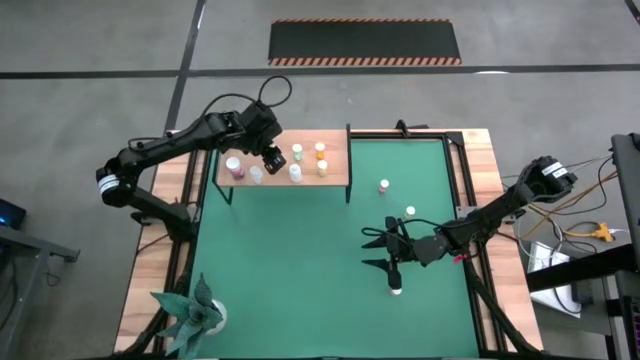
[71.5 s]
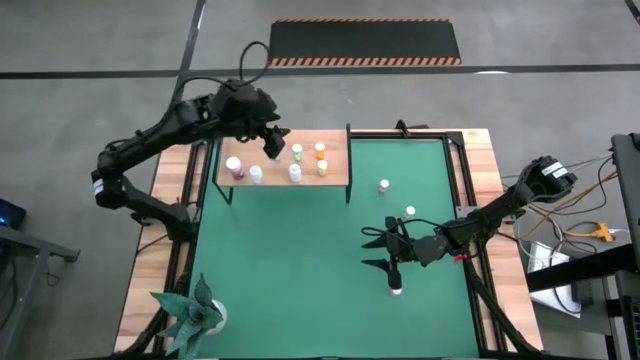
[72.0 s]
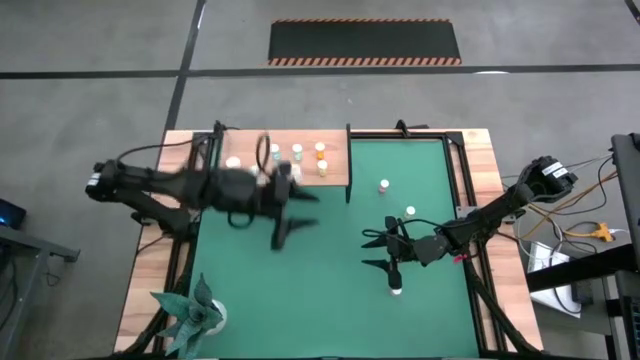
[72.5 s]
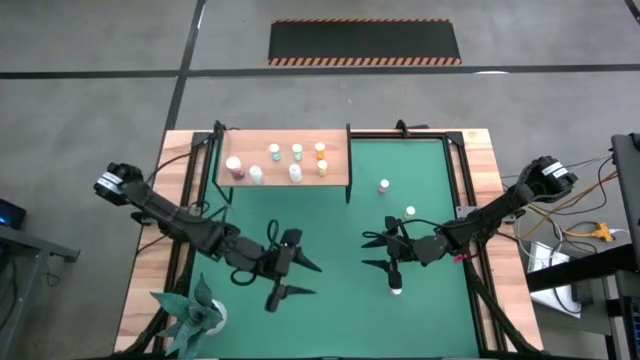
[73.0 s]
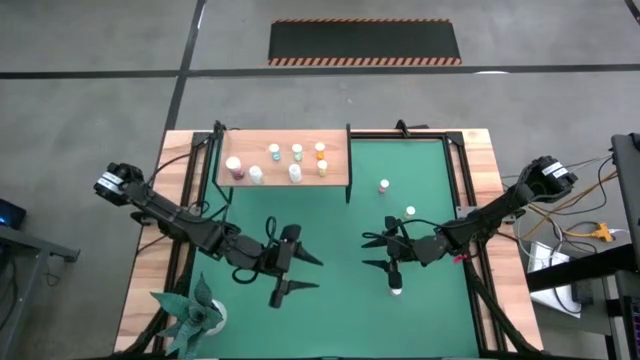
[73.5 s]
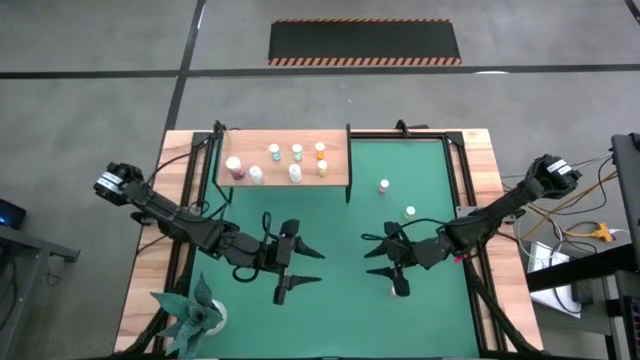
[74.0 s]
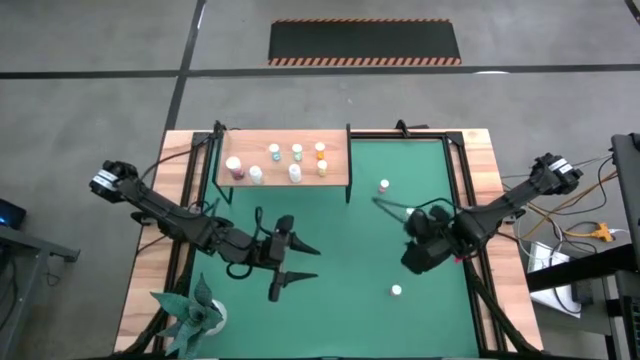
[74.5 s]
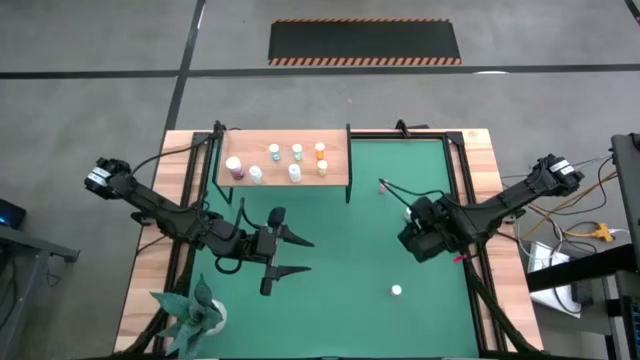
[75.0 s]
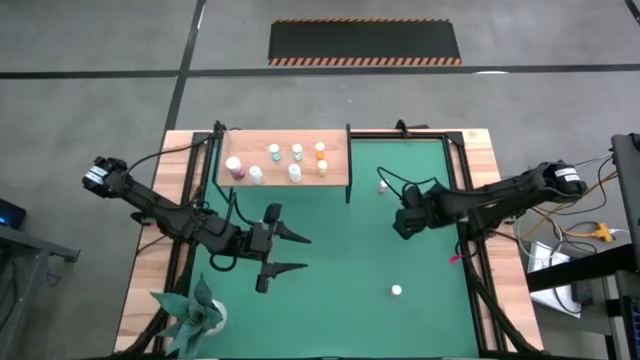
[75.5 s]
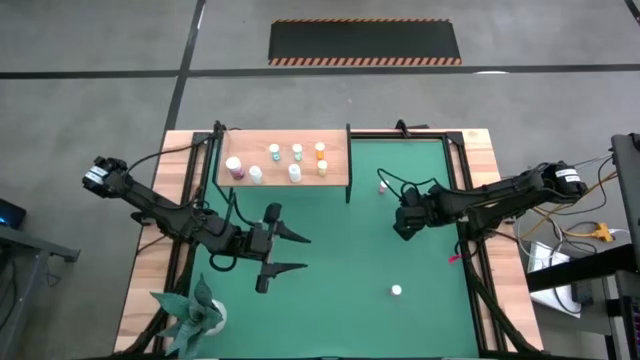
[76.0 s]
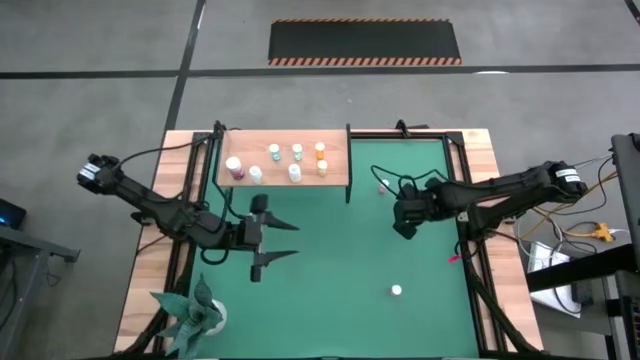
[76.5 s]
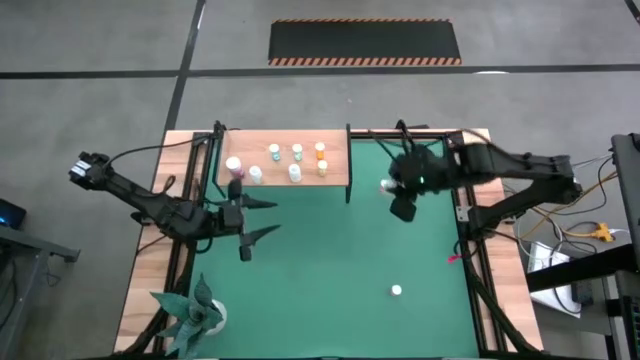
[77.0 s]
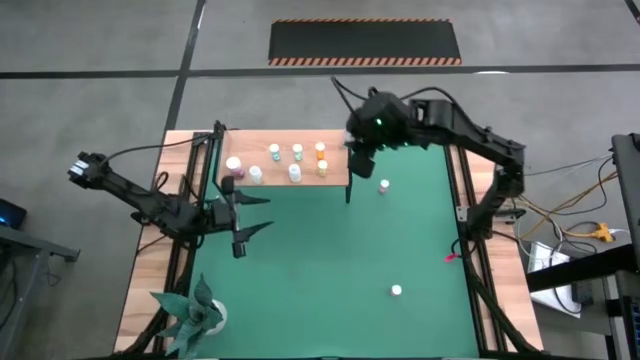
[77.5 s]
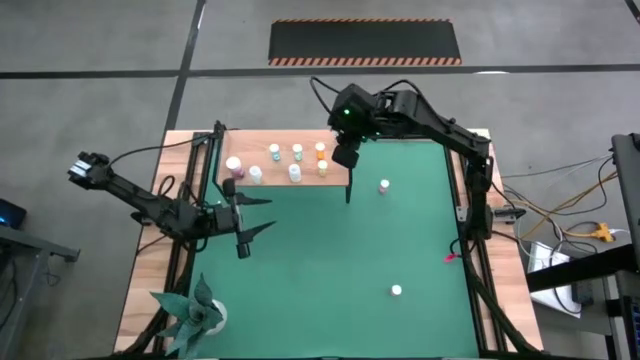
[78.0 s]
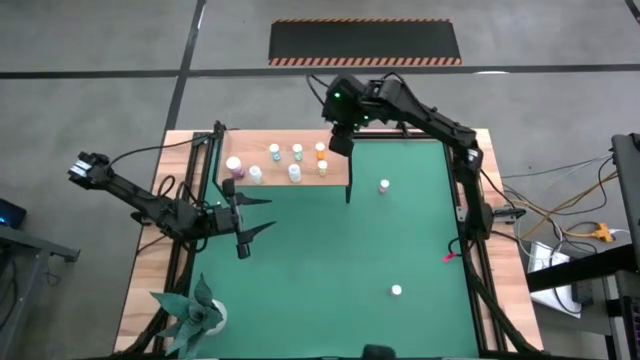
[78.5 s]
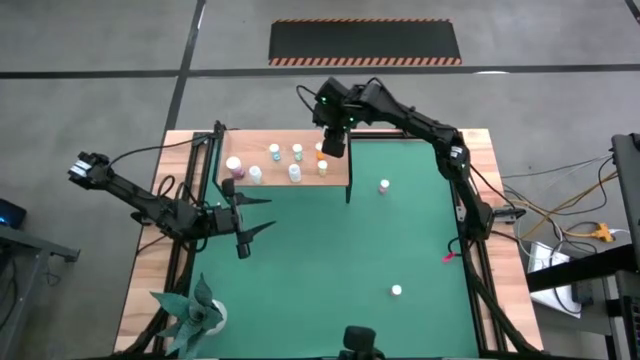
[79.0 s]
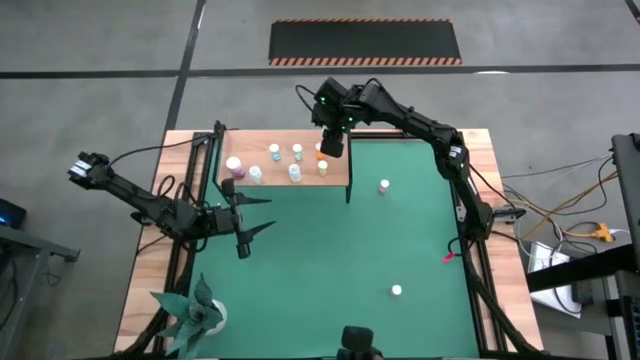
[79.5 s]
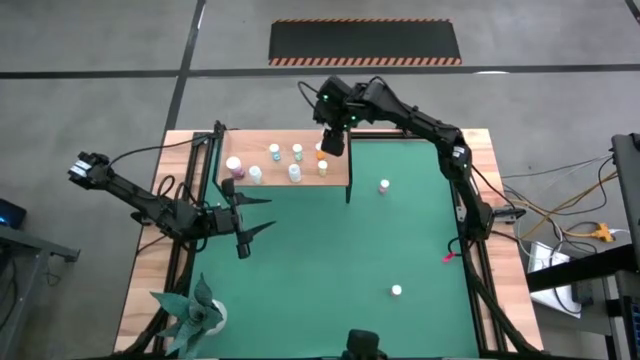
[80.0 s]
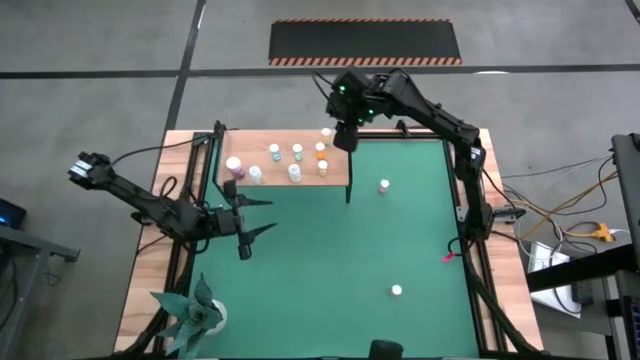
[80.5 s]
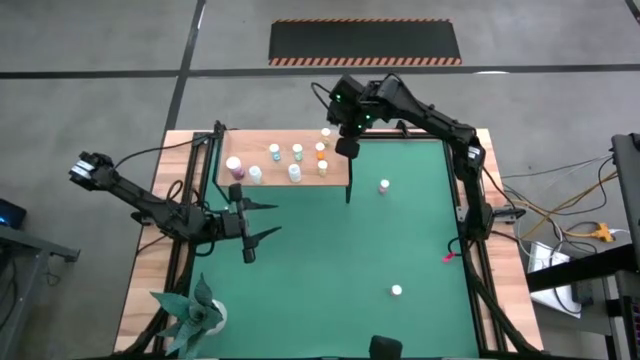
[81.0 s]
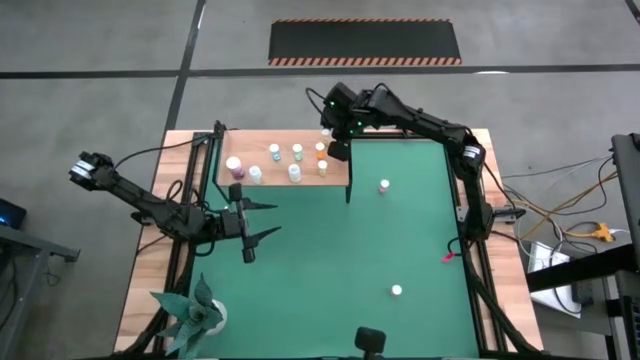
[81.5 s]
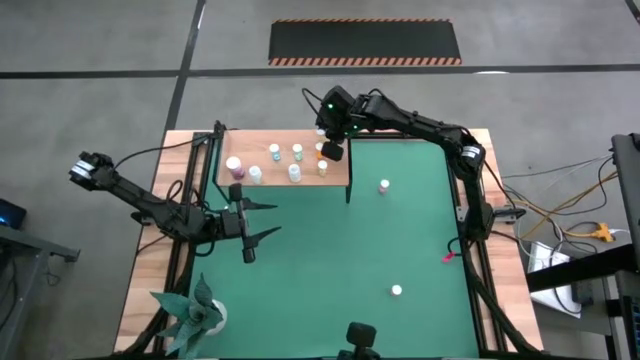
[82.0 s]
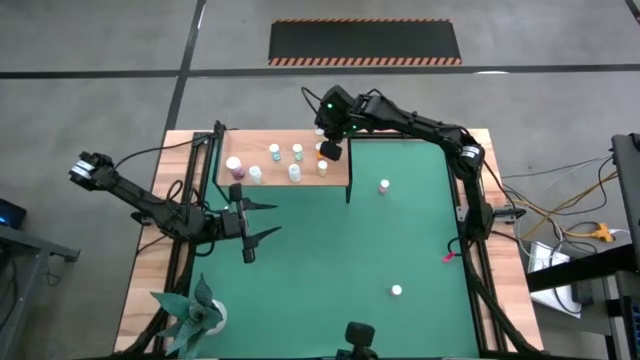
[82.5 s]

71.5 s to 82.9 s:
Task: Pick and place medicine bottles onto shelf by color
Put the yellow pill bottle on the shelf

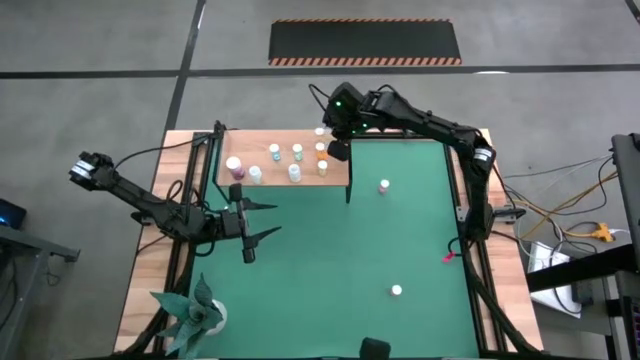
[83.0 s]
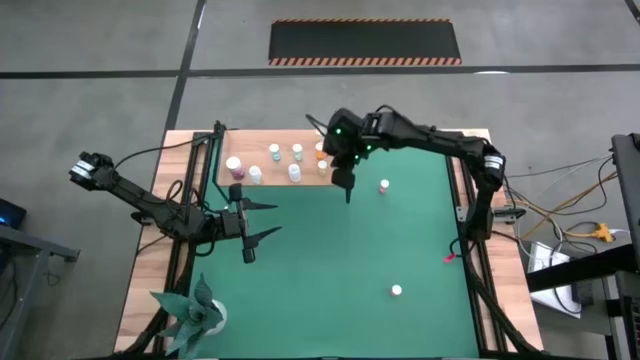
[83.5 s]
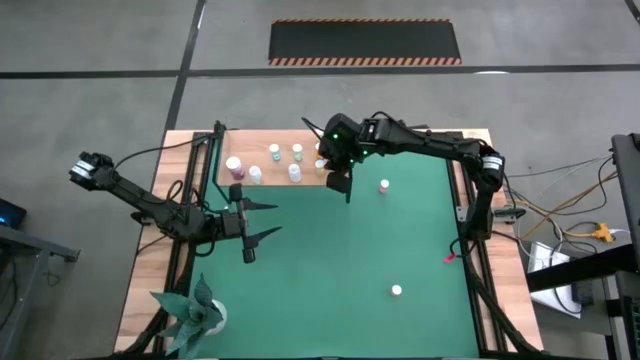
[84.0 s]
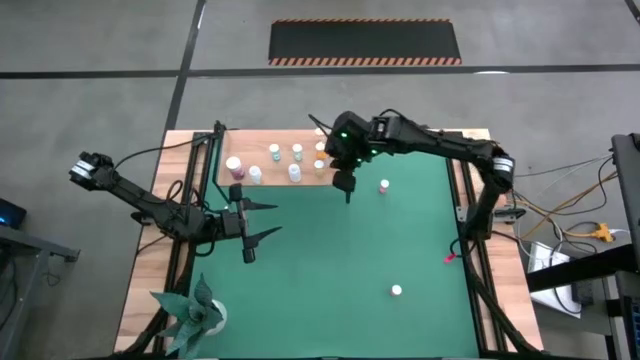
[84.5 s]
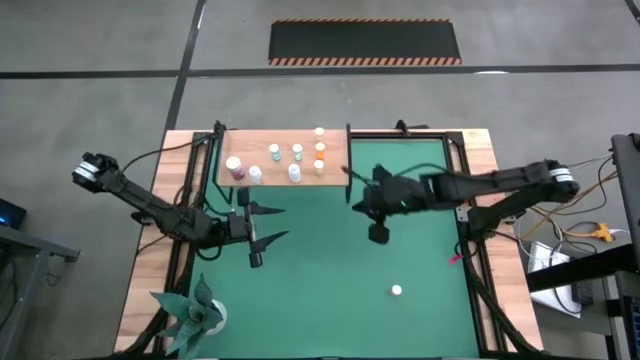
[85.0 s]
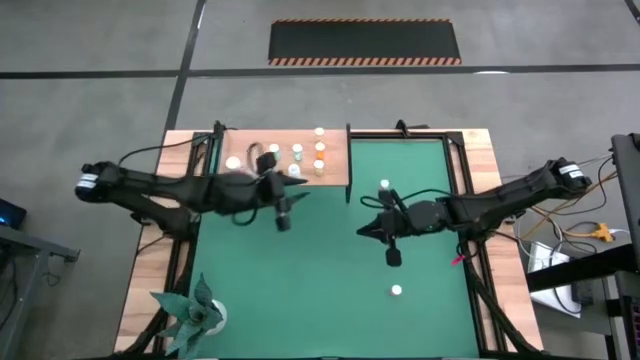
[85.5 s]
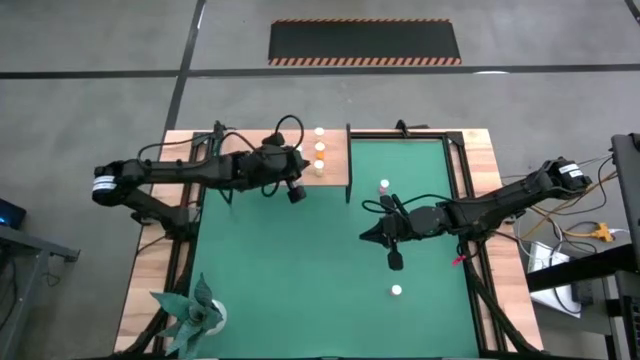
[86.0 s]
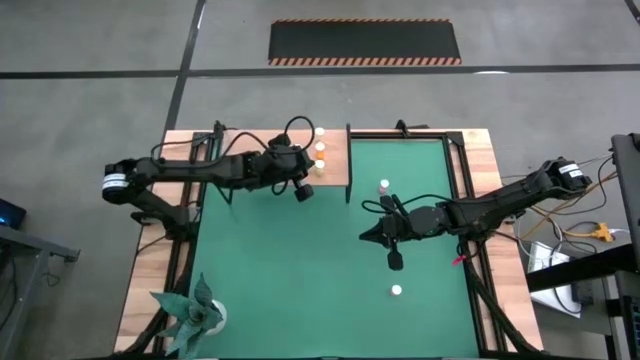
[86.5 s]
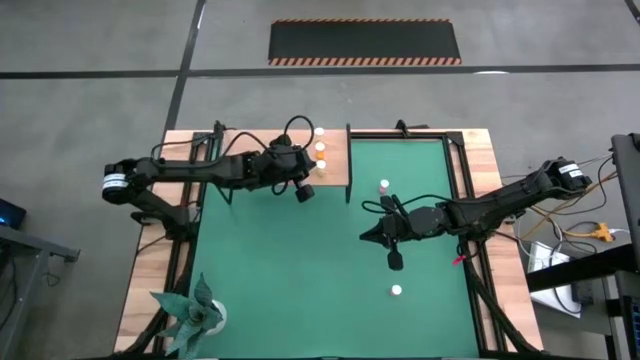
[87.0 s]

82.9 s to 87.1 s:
Adjust the yellow pill bottle on the shelf

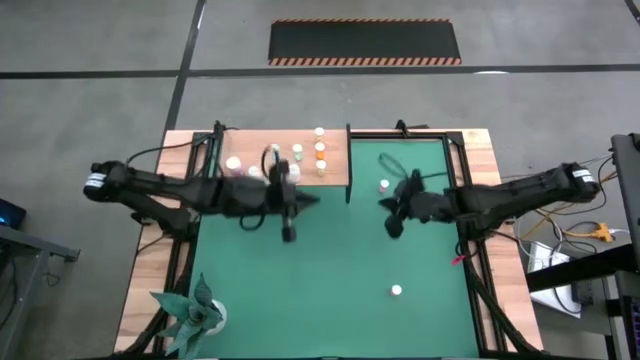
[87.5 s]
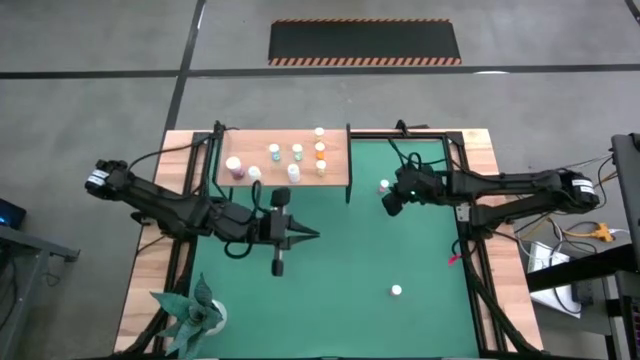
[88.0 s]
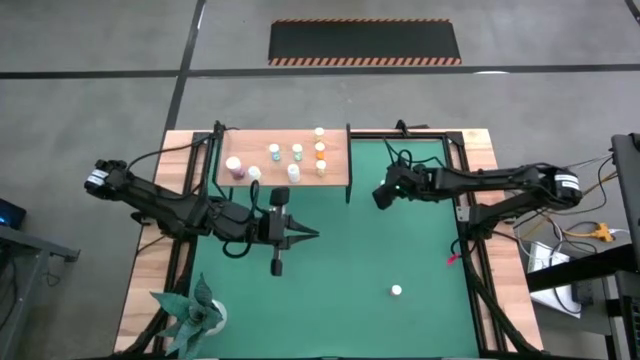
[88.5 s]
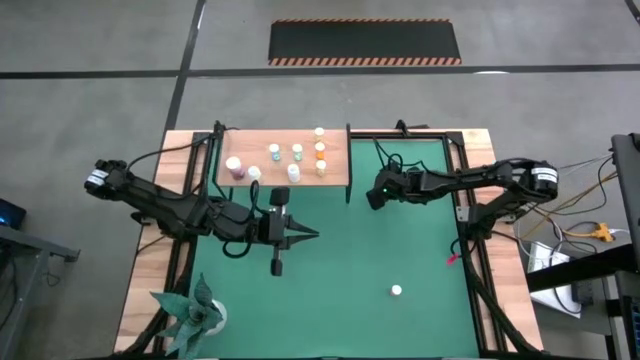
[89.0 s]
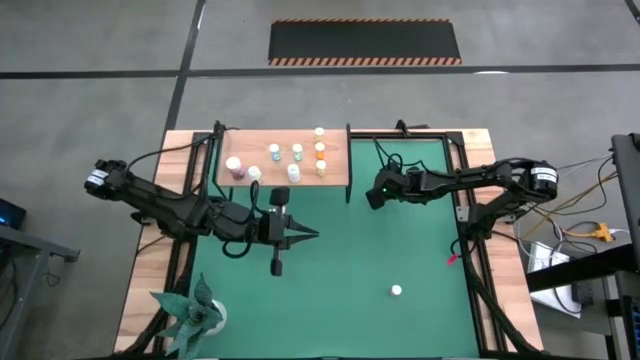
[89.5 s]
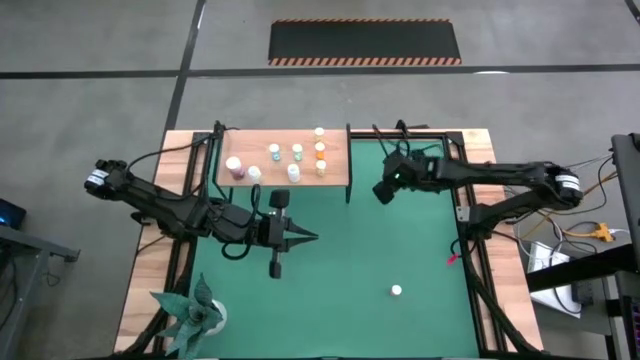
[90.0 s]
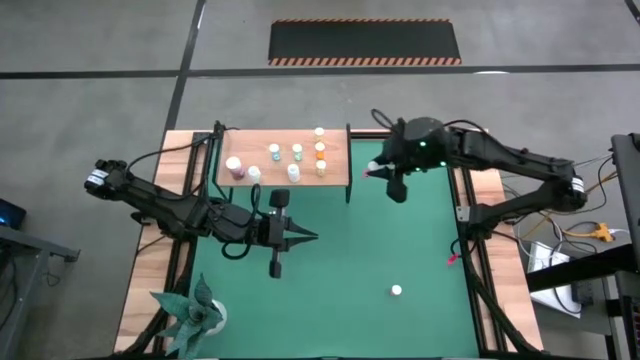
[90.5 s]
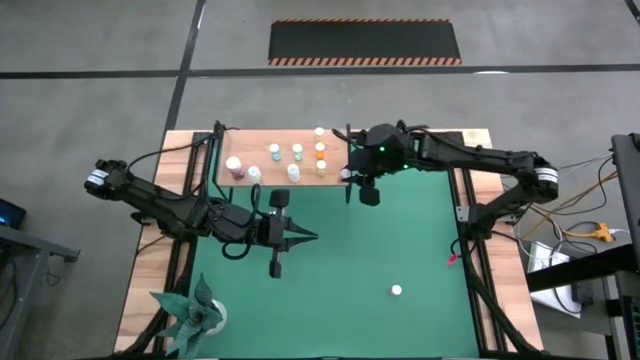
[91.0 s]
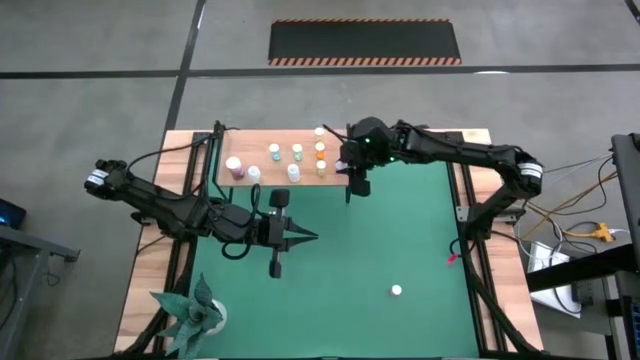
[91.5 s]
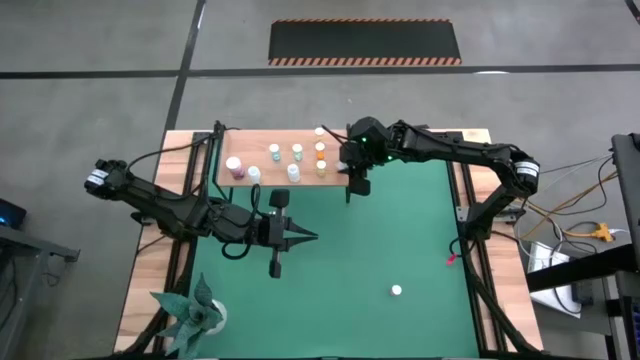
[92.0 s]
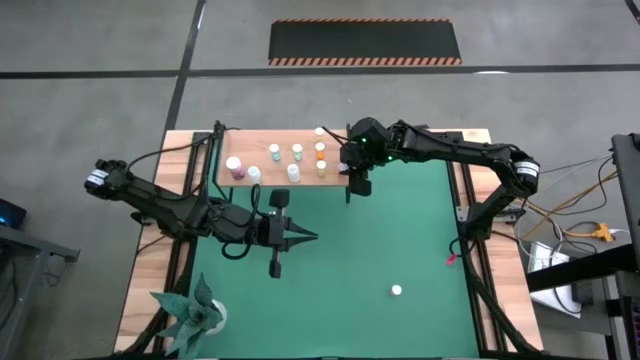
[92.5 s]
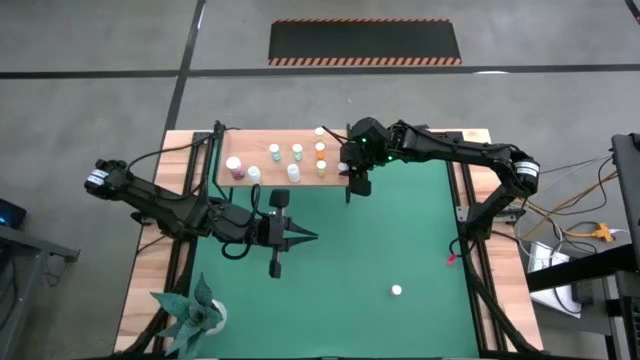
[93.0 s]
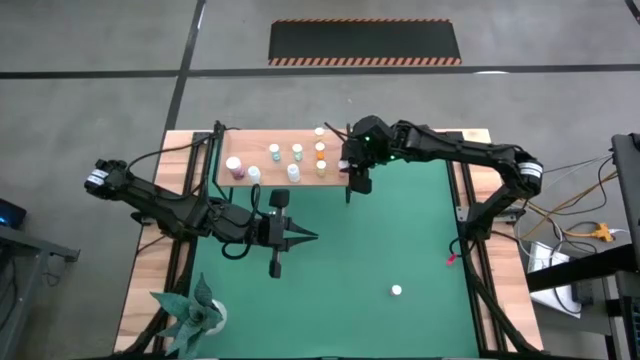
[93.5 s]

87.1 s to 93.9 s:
Put the top small pink pill bottle on the shelf
